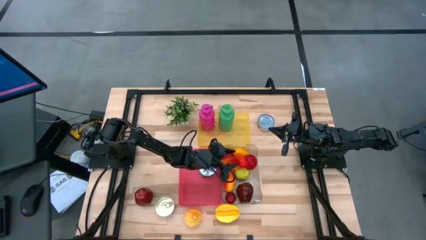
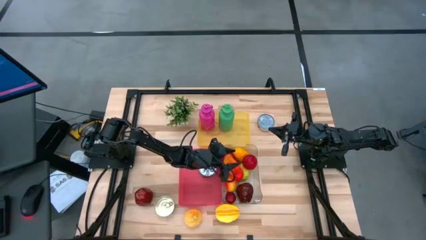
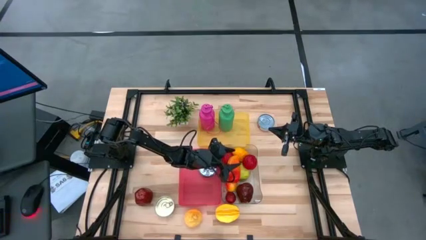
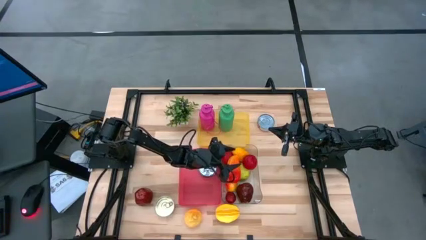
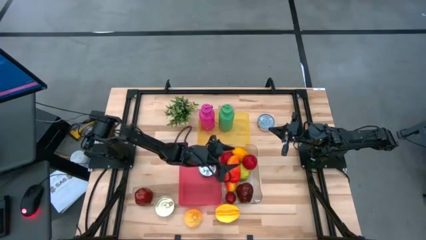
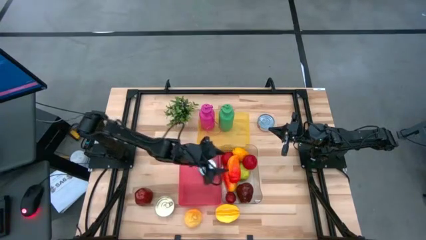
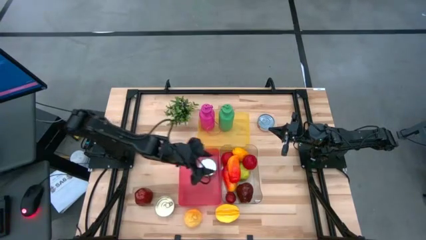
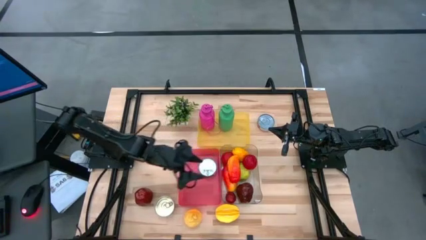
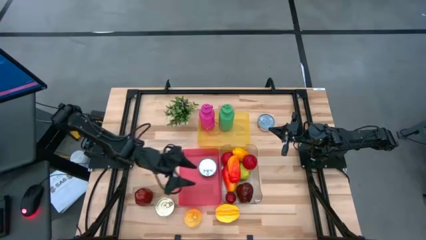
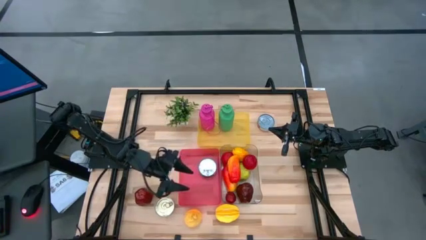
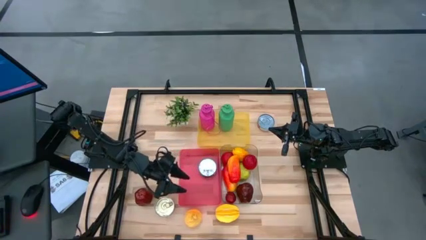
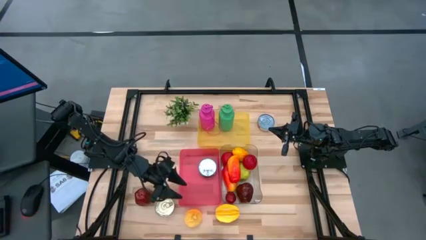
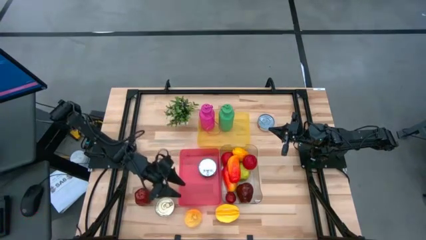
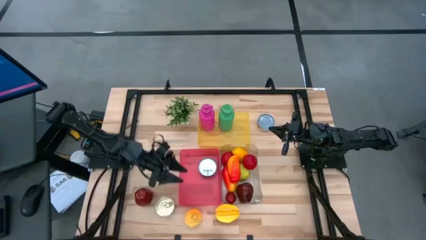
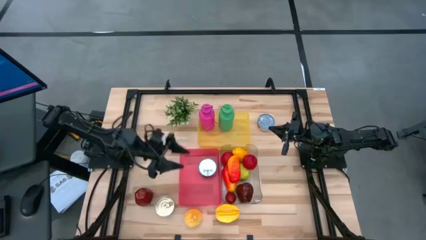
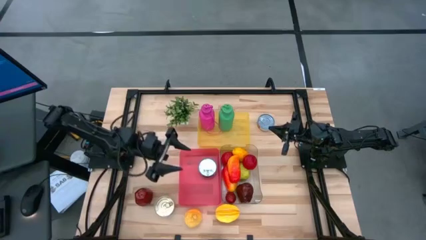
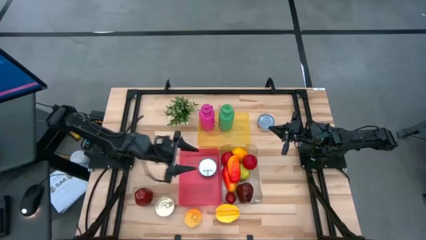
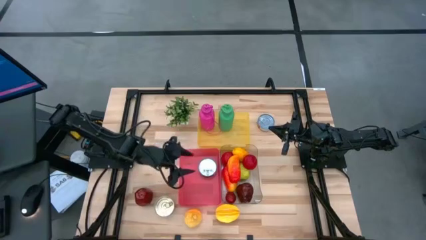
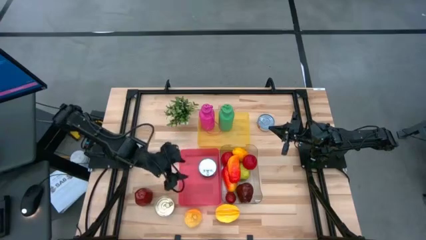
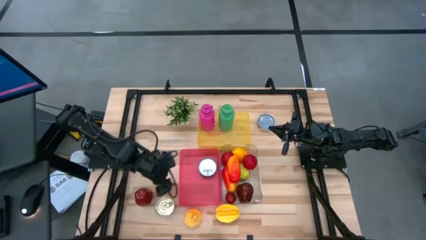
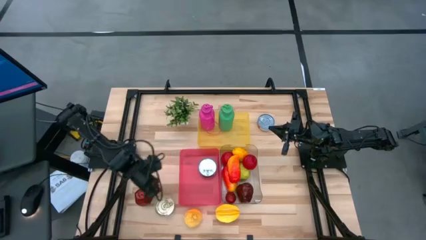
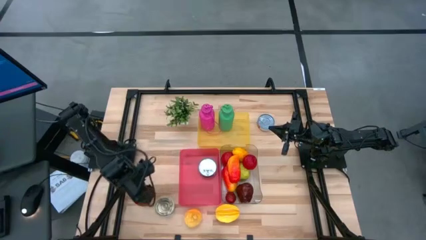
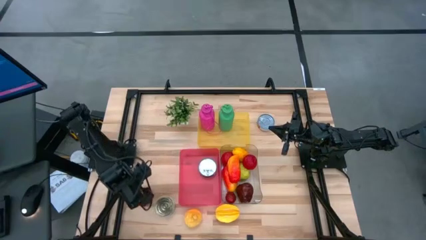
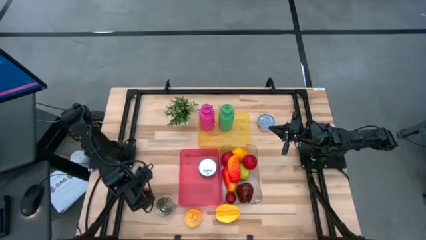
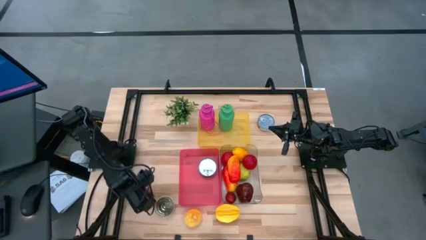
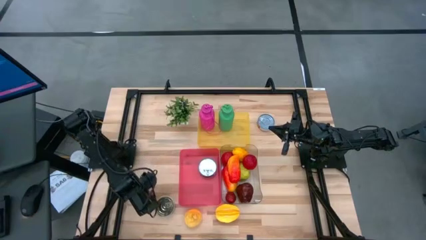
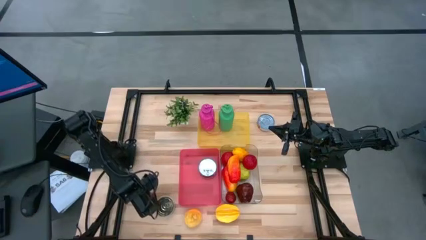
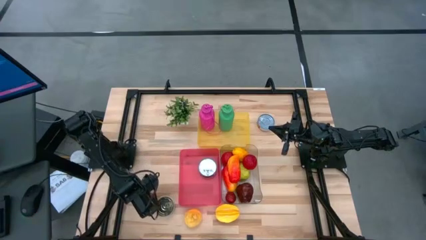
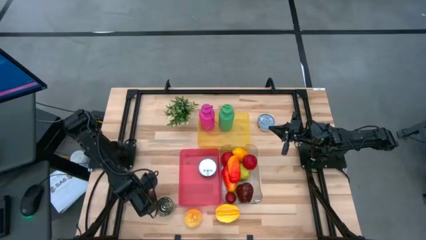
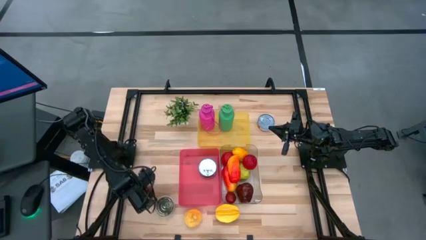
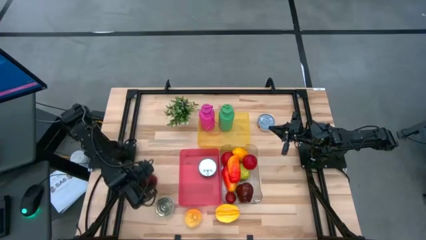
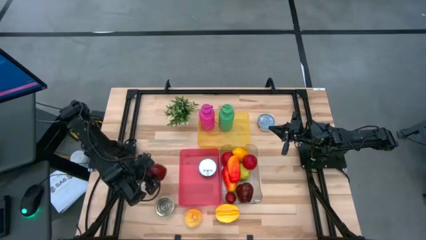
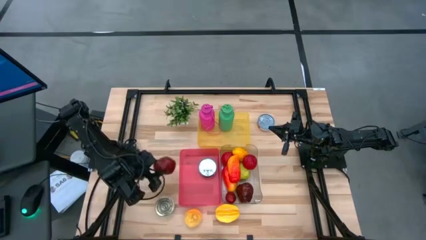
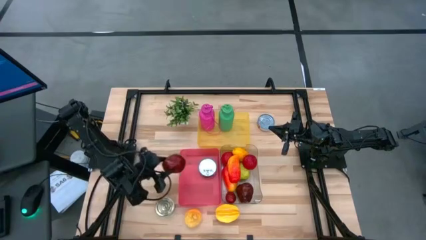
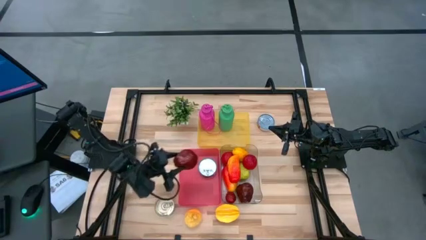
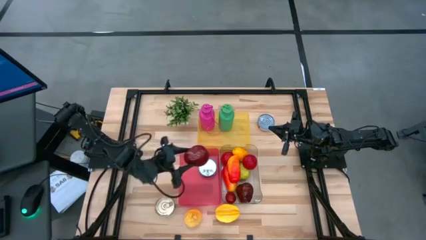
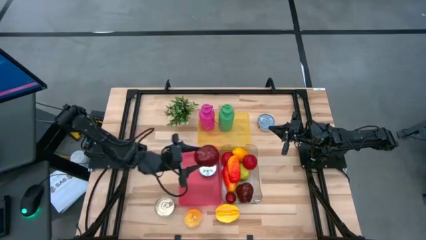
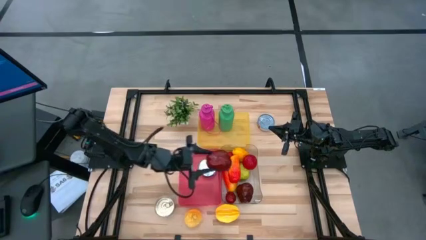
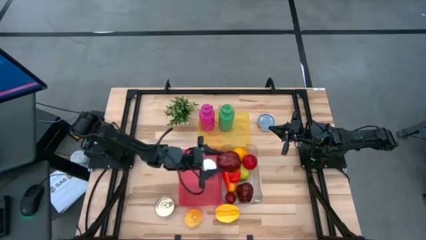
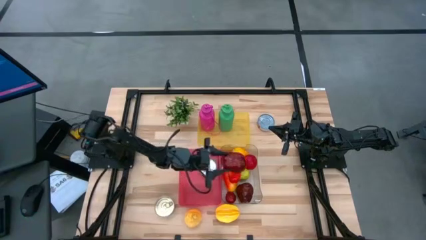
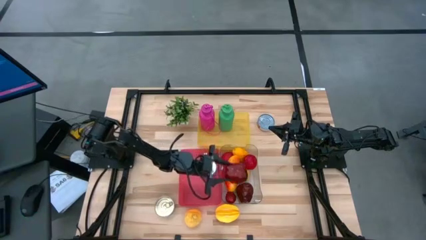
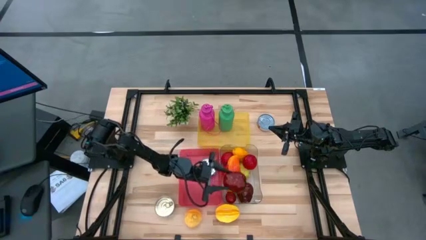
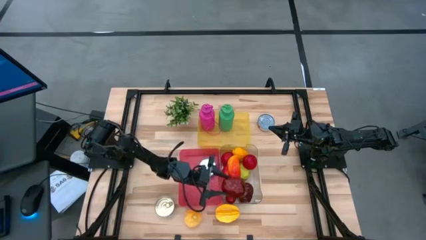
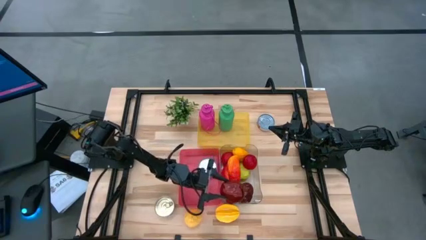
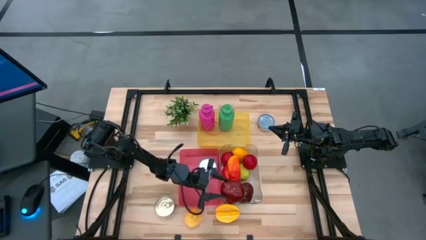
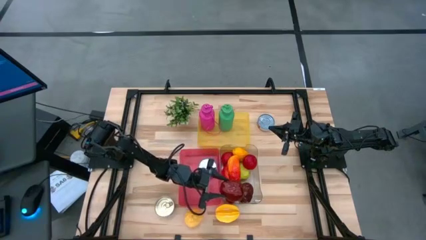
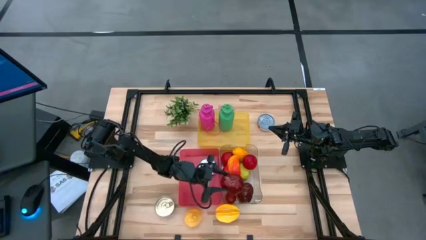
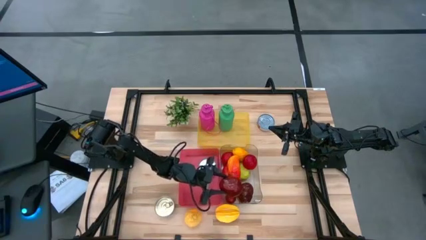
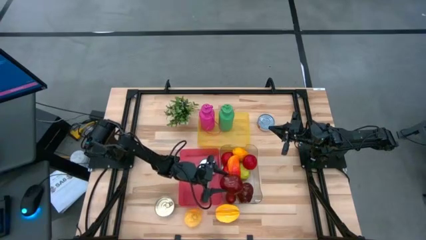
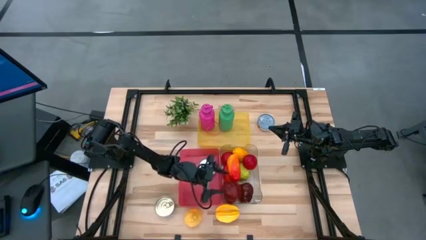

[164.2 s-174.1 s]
Task: Pick & Place Food Item
Put the dark red apple into the transparent bin

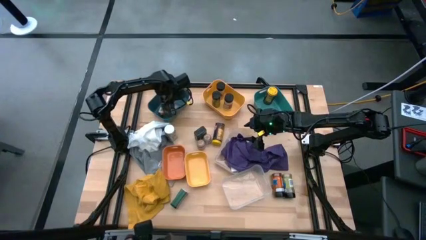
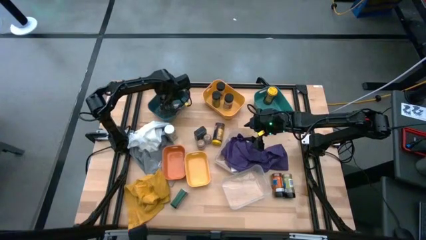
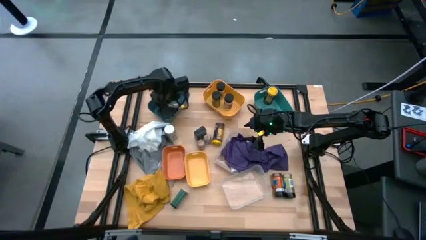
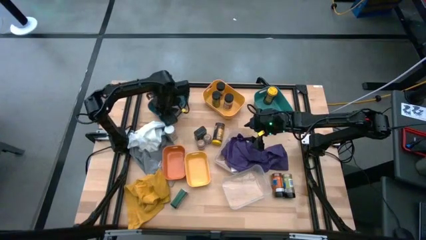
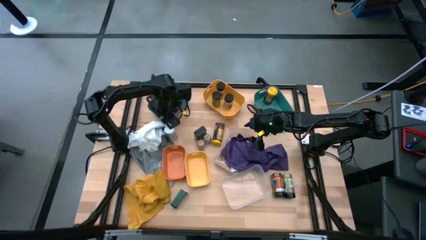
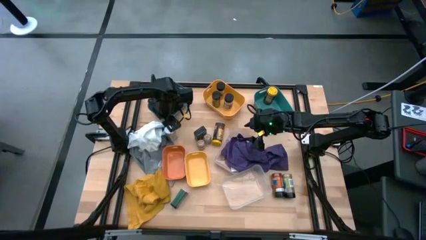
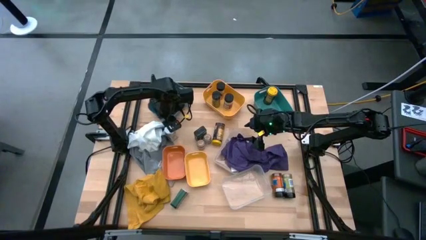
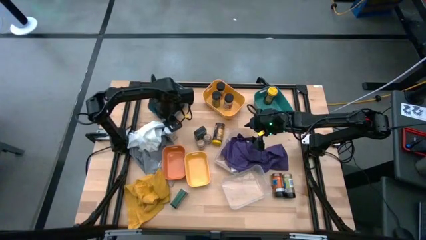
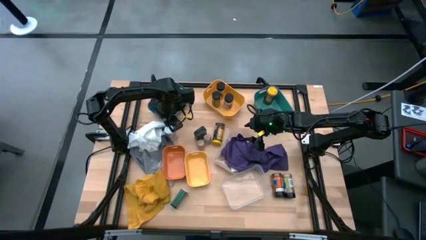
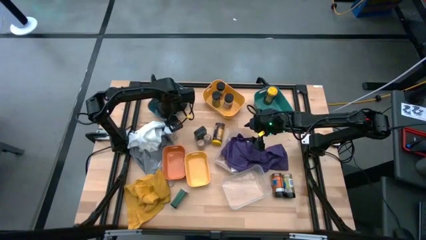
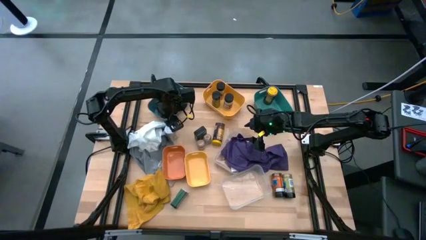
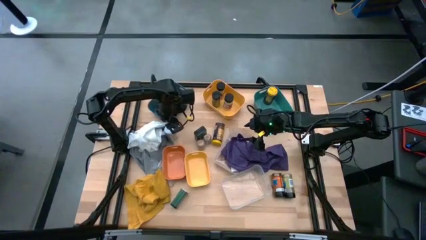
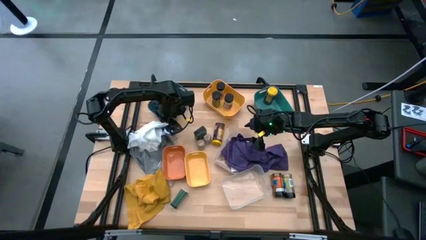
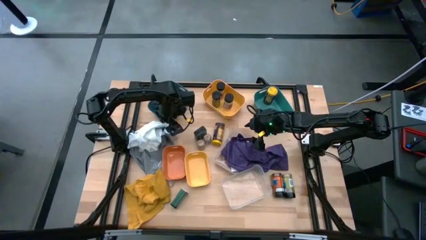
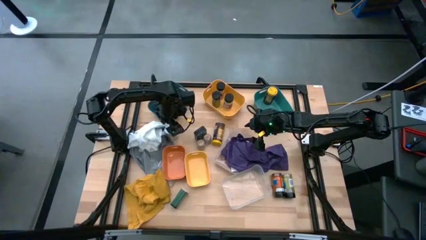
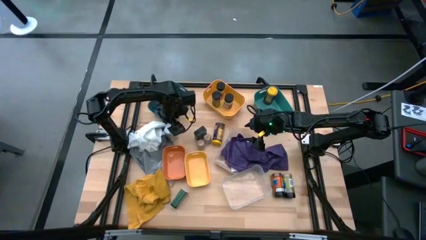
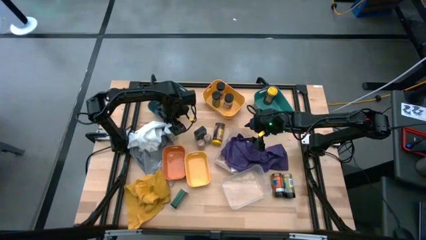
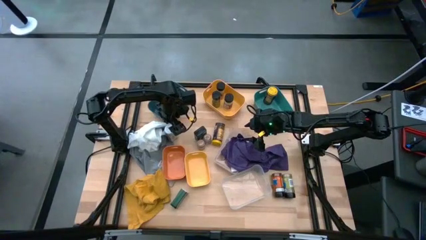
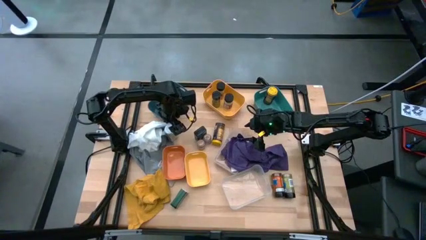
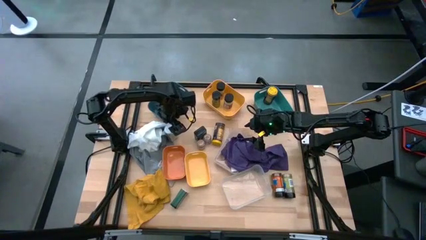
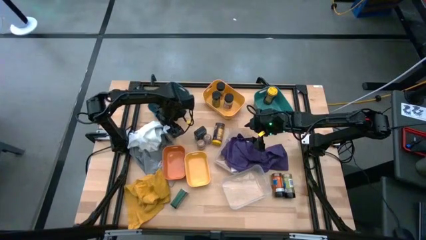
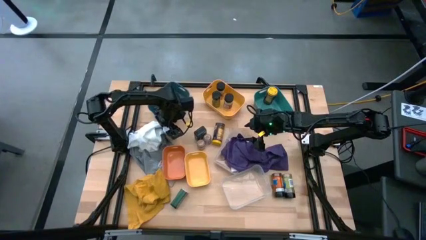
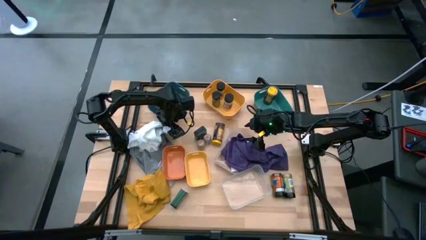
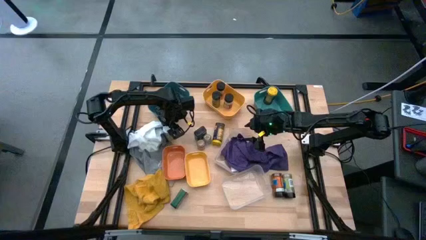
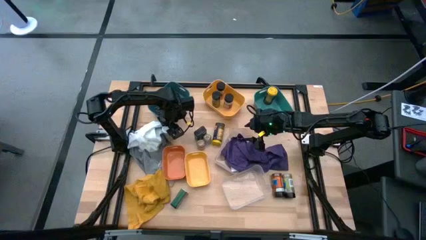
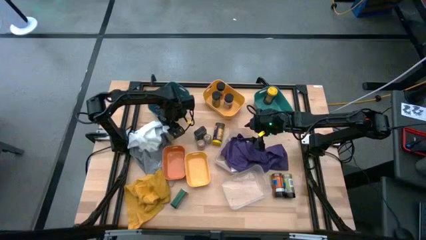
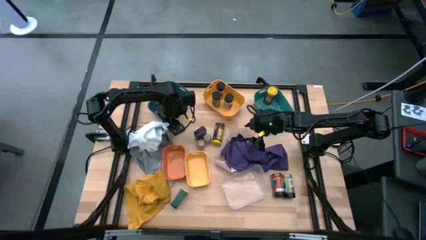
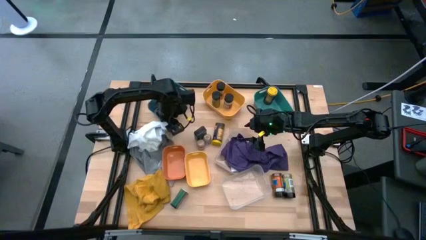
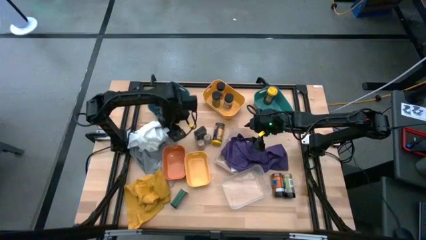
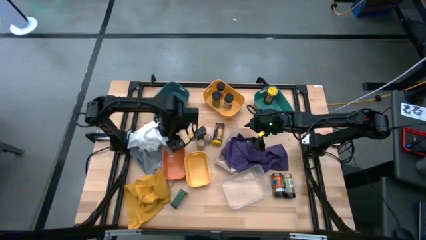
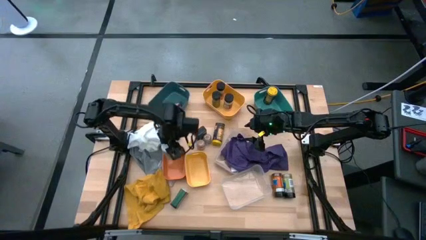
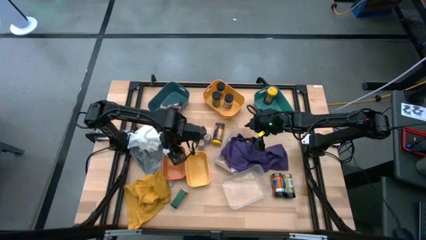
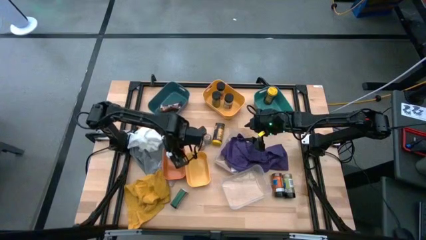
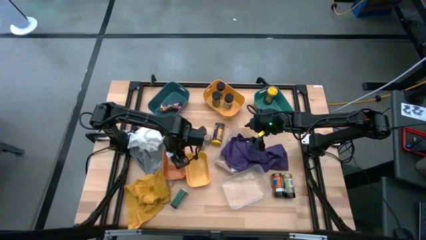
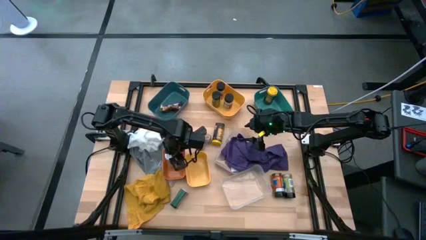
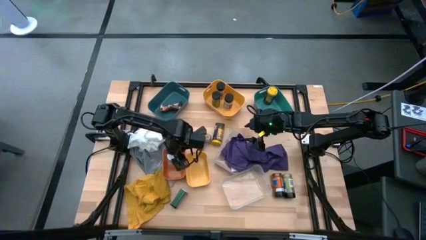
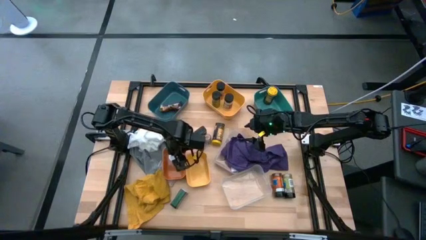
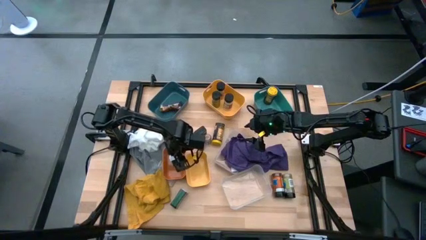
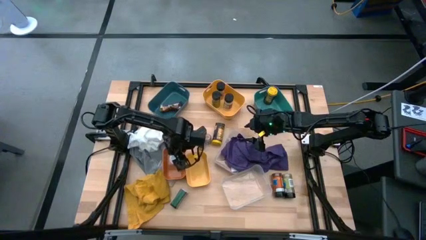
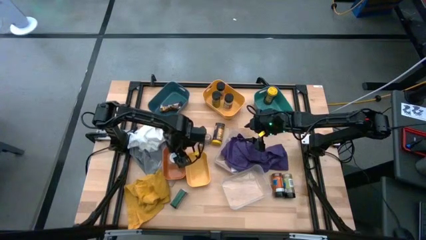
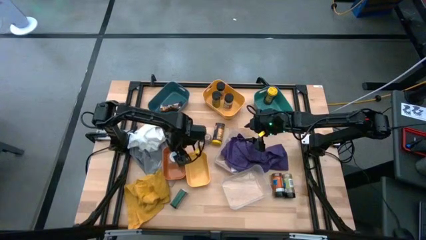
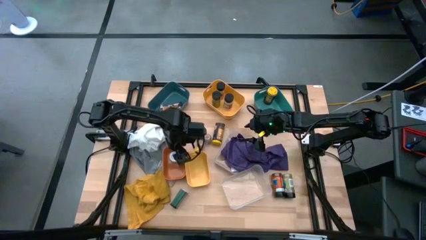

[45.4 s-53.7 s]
Task: Sort spices by type
Put the white spice bottle into the orange bin
